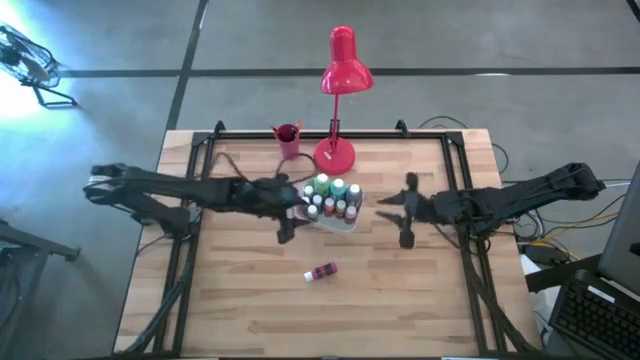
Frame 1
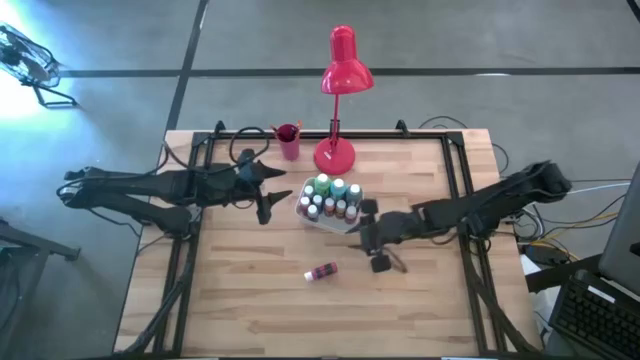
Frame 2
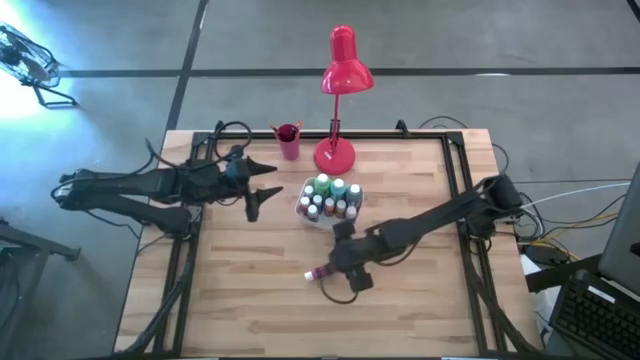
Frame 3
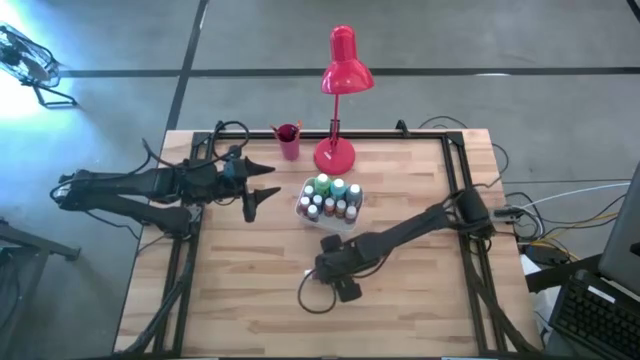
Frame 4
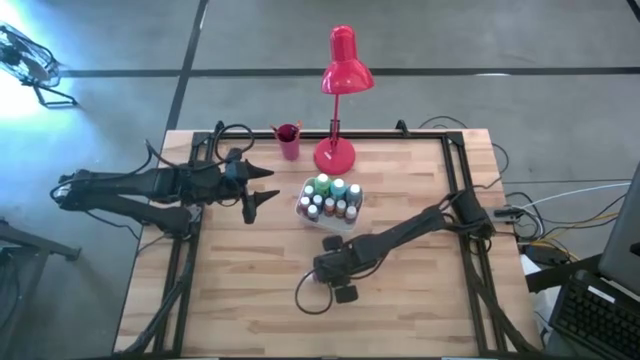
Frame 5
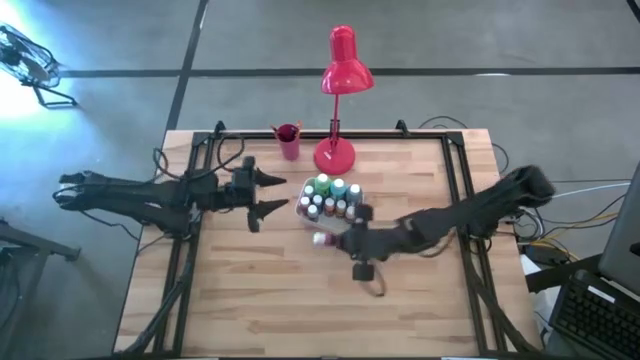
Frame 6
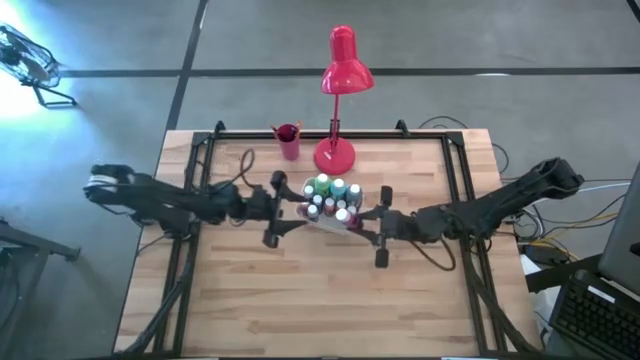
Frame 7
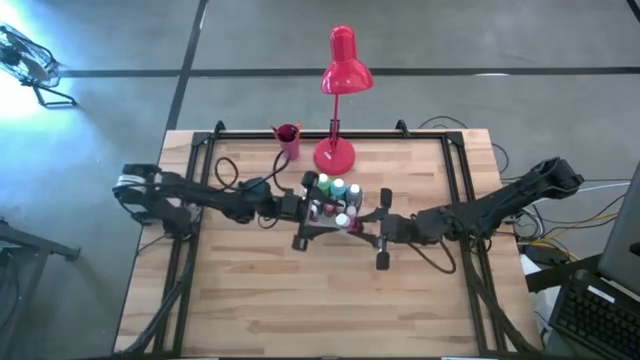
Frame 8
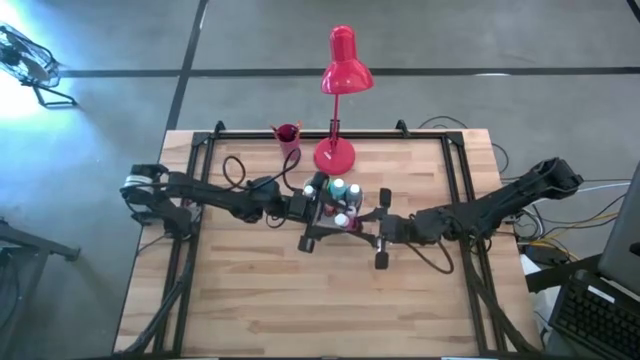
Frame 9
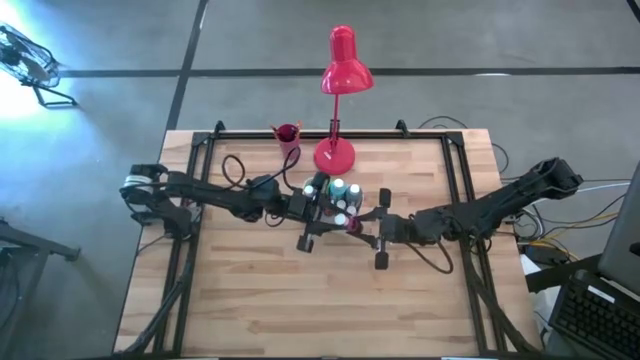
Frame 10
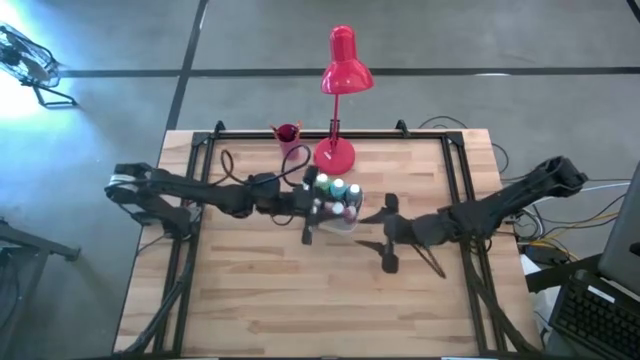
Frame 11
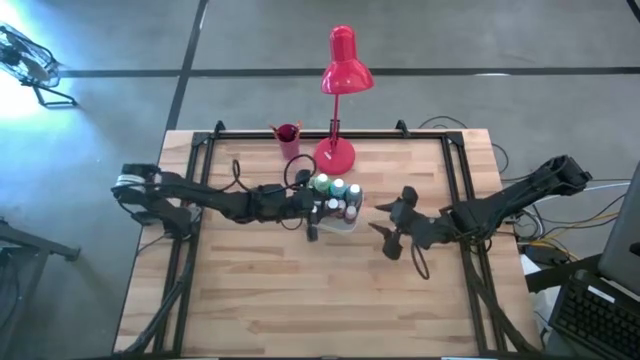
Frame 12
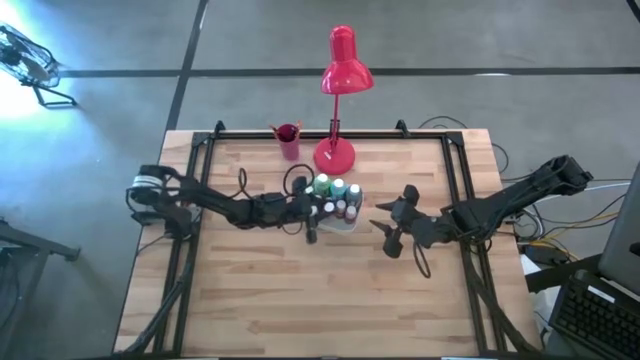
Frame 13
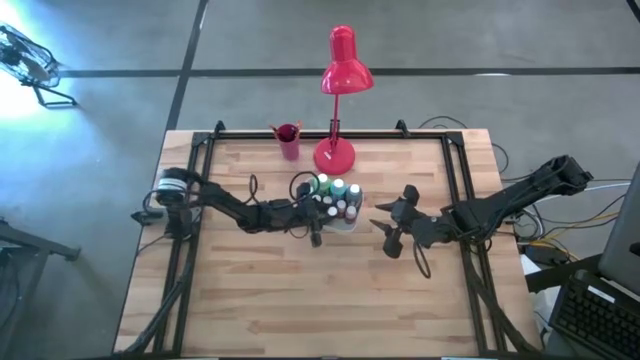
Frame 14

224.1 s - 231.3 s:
Task: Pick & Place Paint Supplies
Put the dark pink paint bottle into the white bin

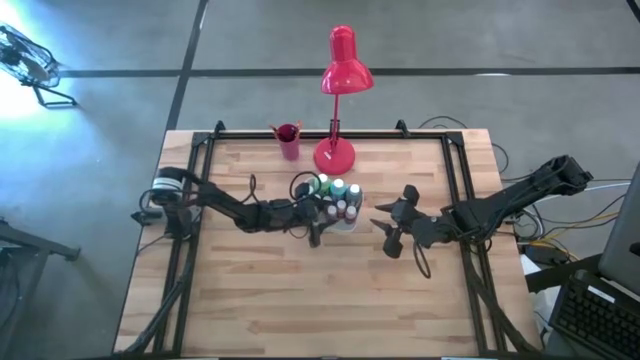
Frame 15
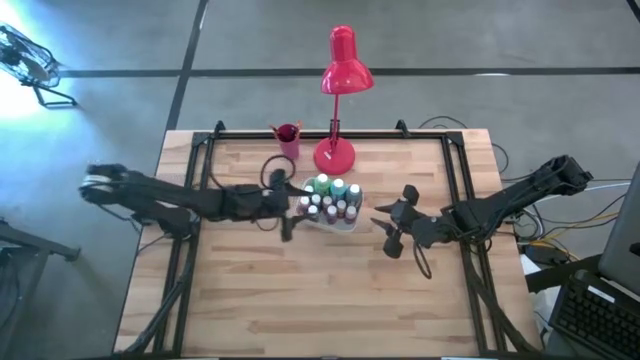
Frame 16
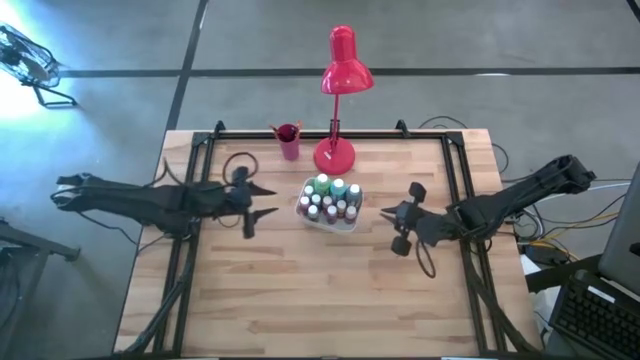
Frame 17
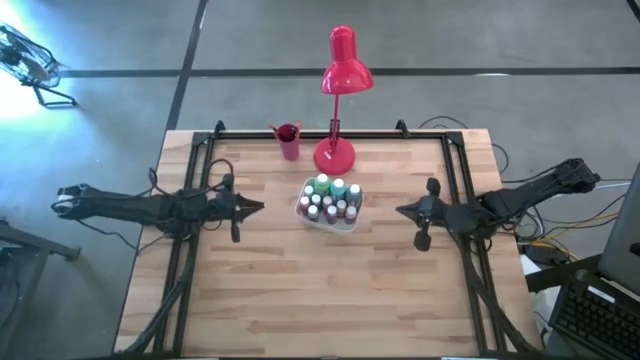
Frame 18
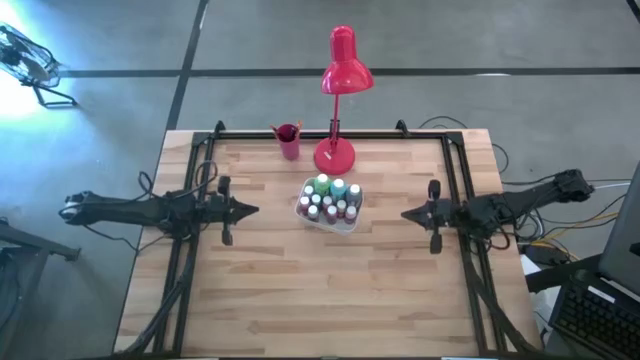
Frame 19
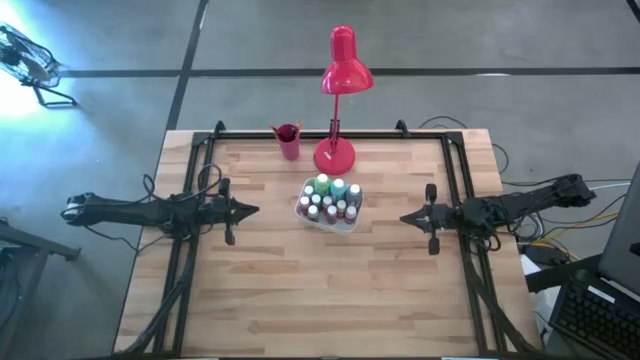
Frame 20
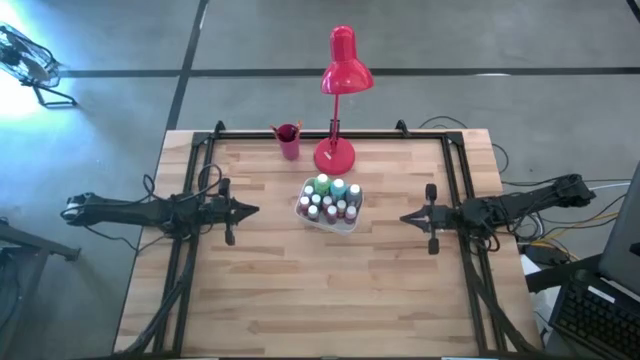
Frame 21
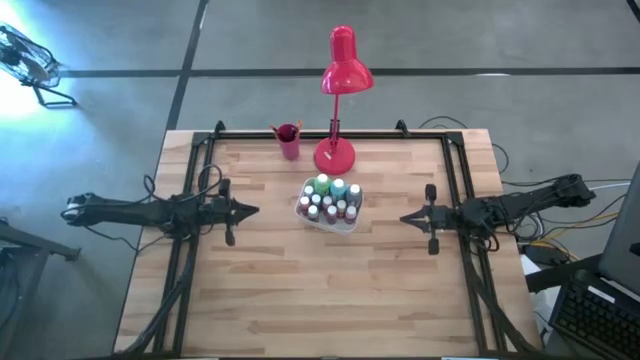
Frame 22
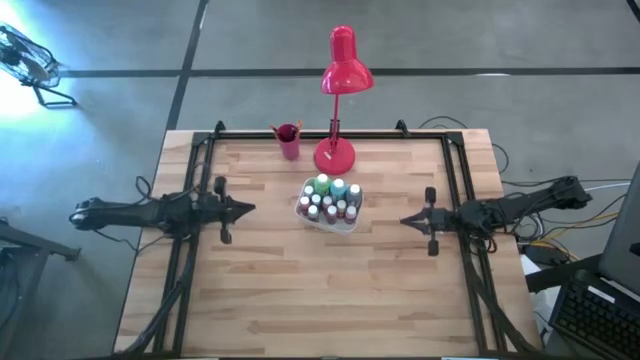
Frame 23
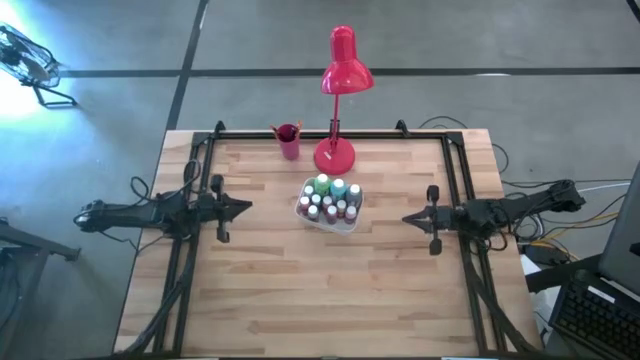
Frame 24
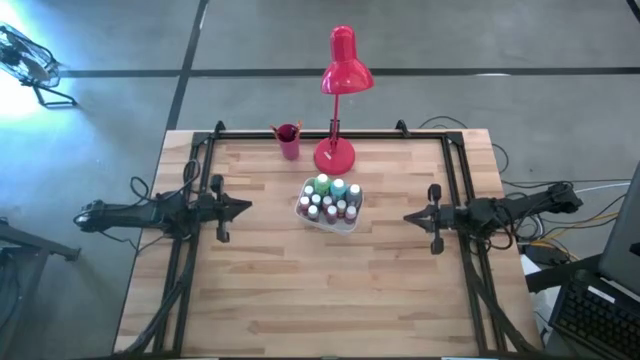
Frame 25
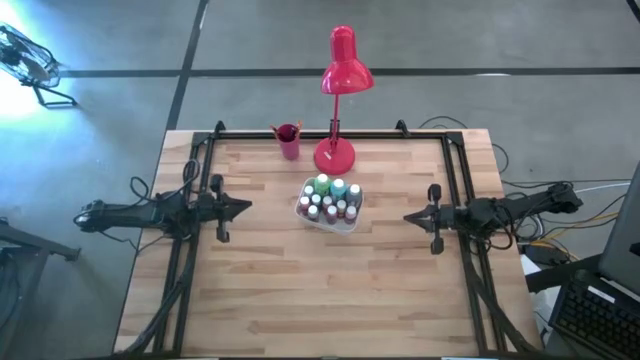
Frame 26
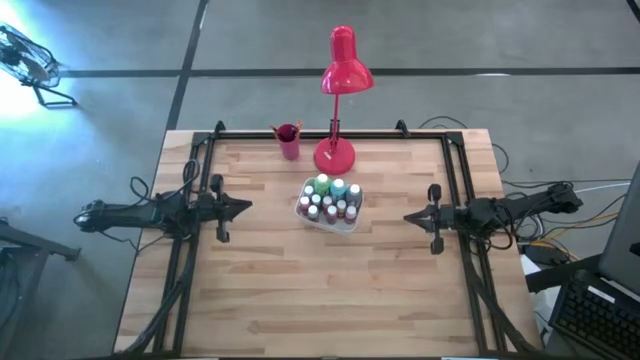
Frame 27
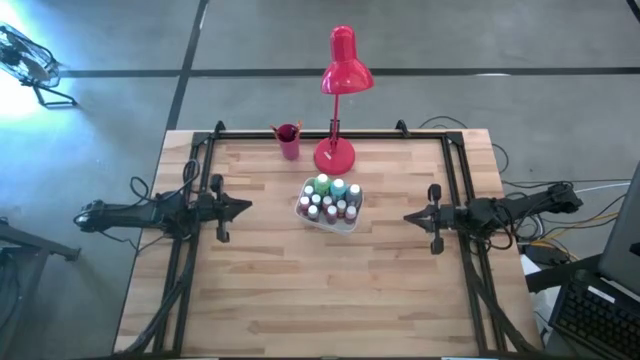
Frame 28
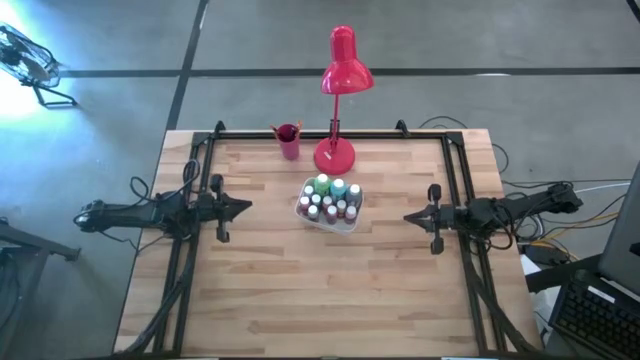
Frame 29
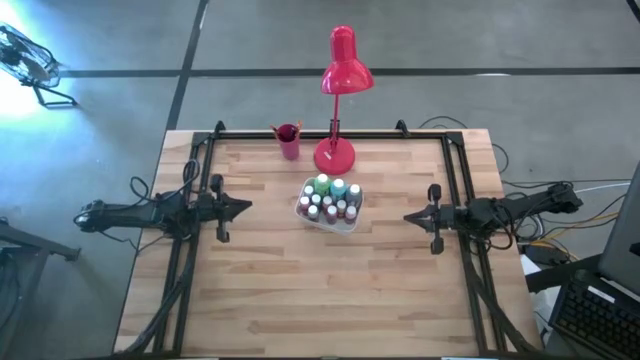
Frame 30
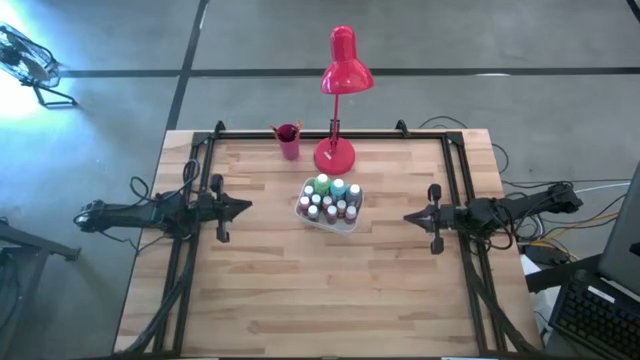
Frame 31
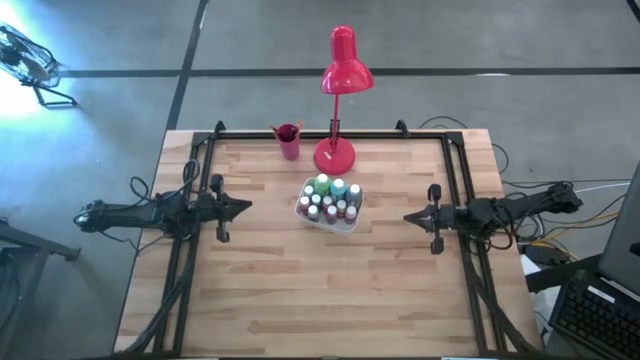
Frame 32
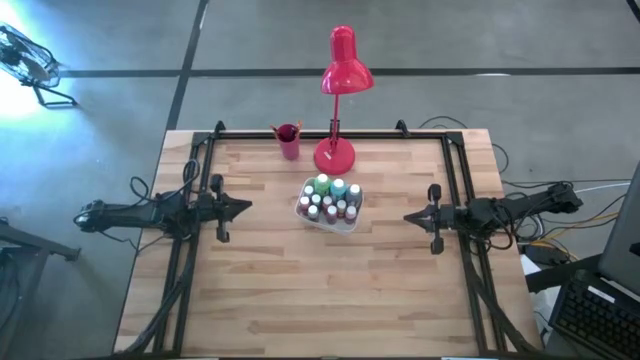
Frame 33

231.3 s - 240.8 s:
Return to Home Position

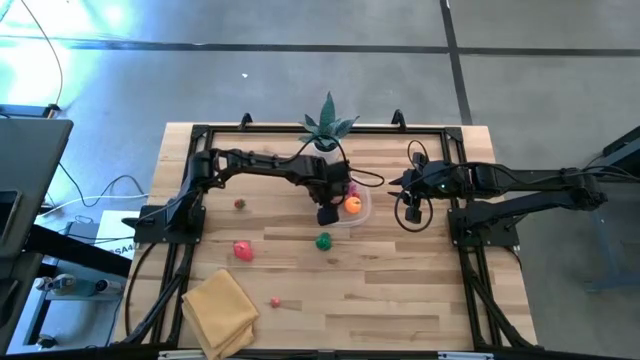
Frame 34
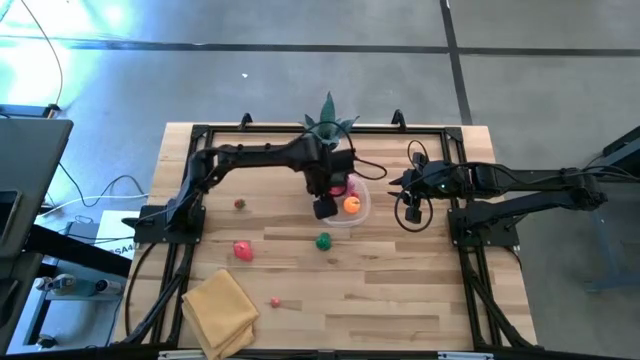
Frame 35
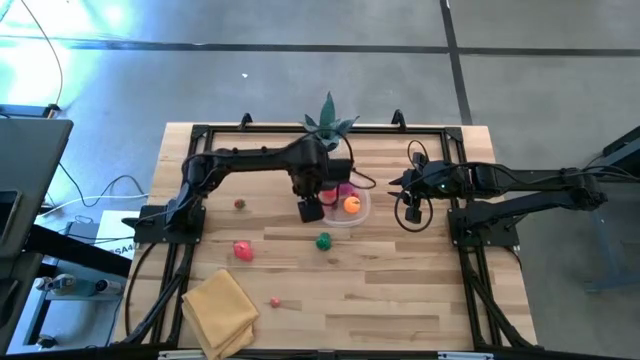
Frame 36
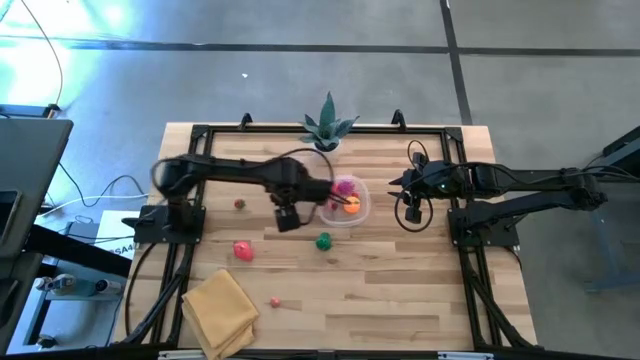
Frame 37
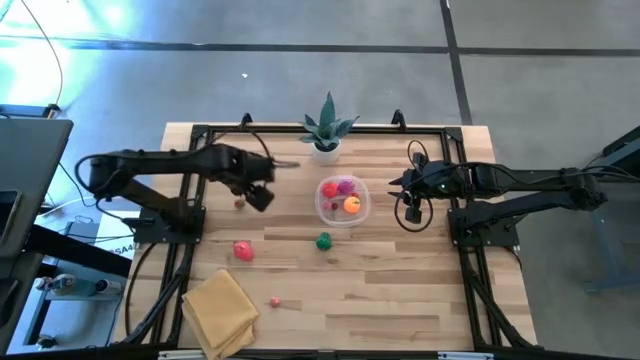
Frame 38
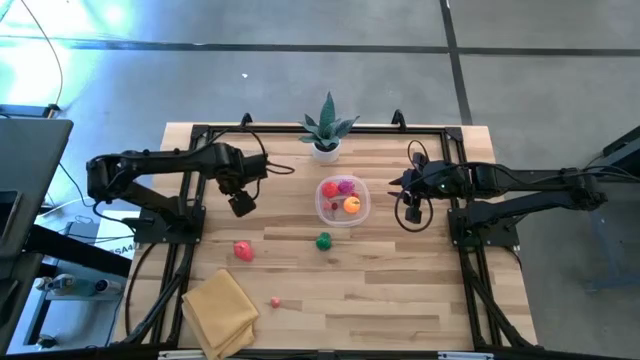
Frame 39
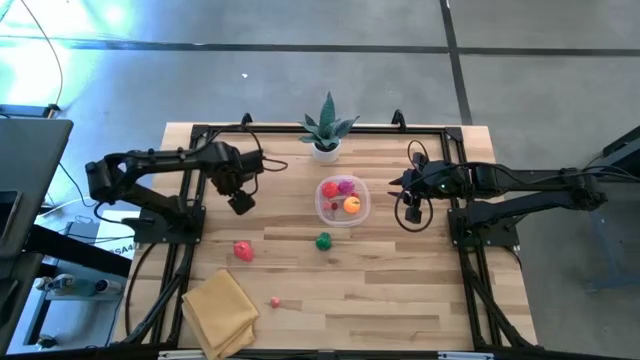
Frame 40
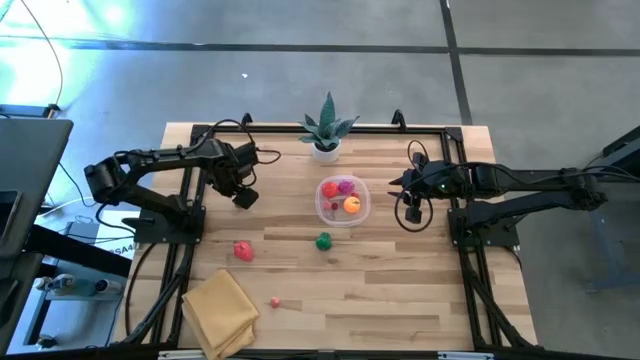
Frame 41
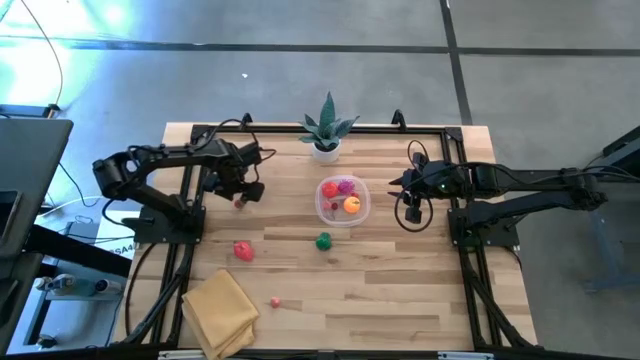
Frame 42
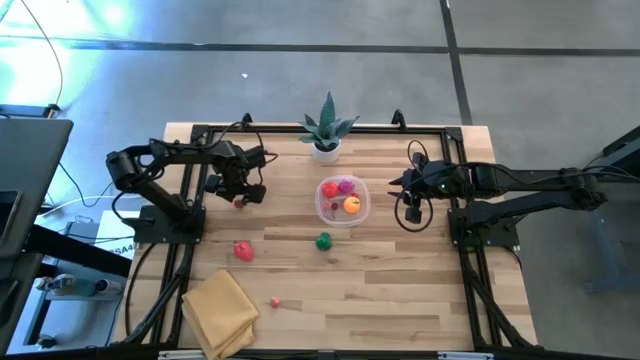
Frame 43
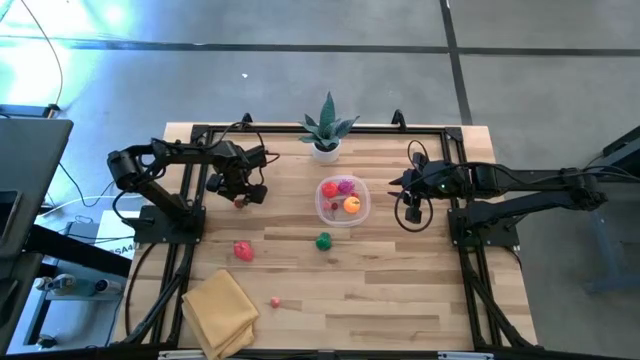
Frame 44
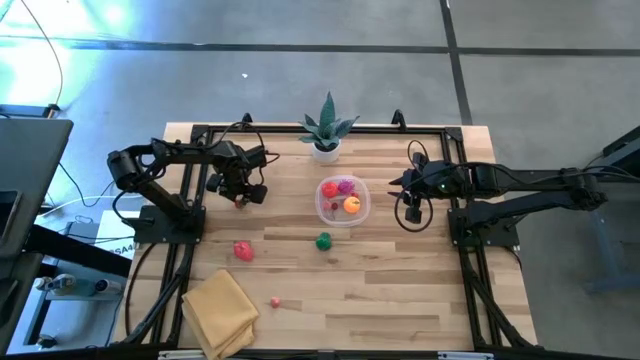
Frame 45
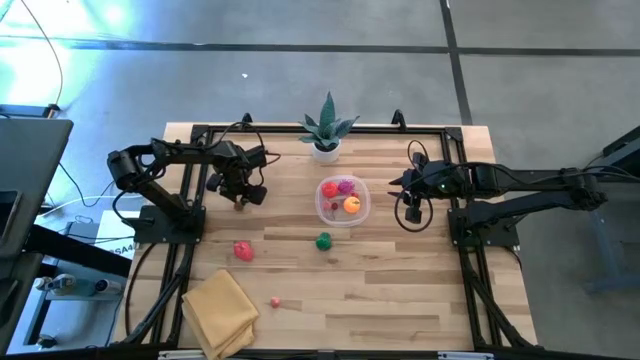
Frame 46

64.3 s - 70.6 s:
Task: Pick and placing Produce into tupperware
Put the red strawberry into the transparent container
